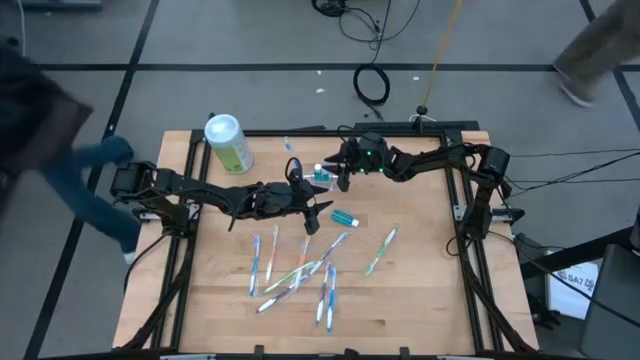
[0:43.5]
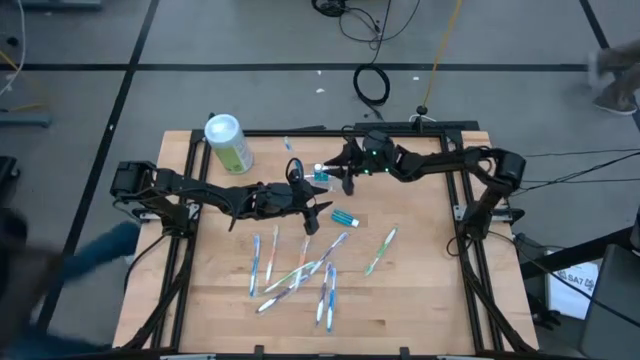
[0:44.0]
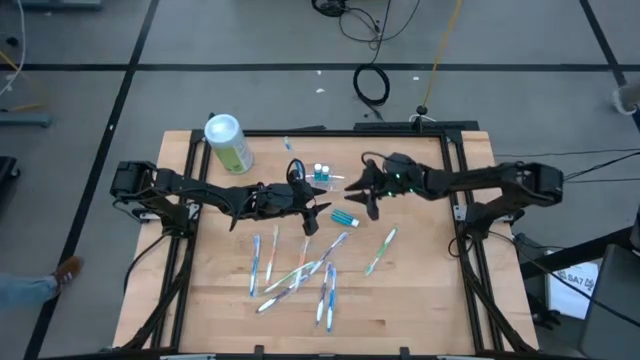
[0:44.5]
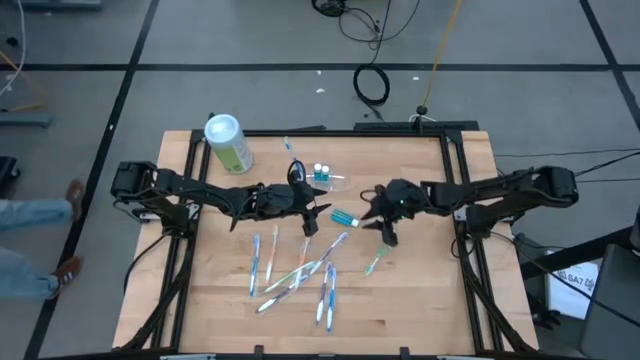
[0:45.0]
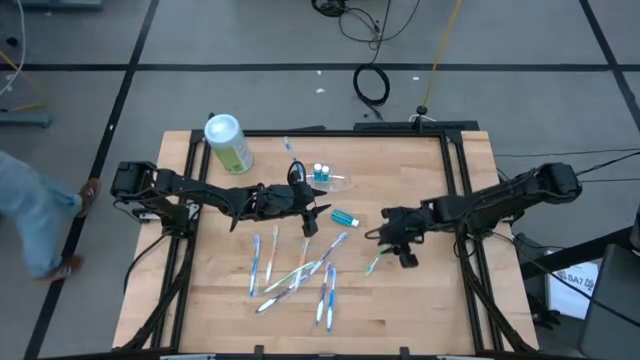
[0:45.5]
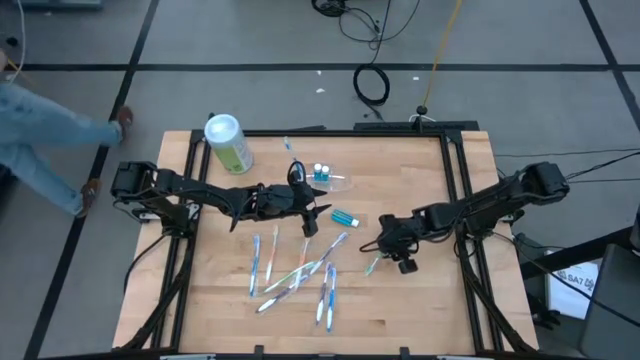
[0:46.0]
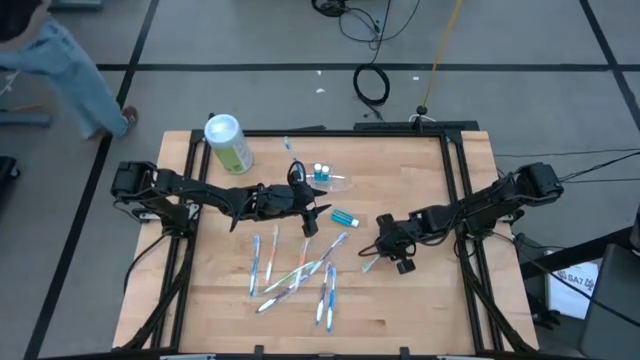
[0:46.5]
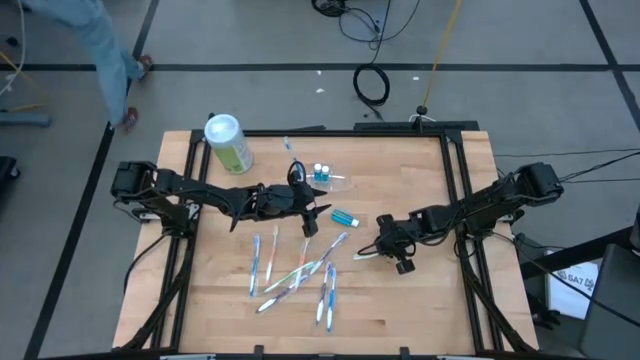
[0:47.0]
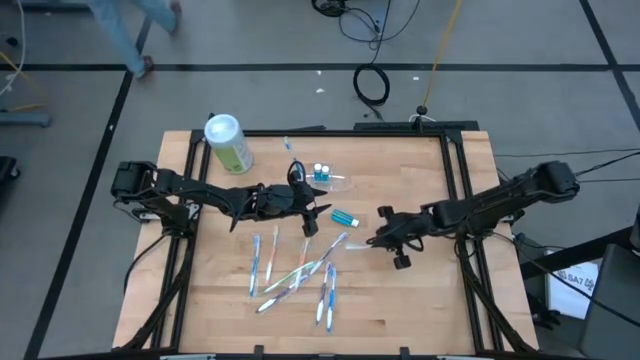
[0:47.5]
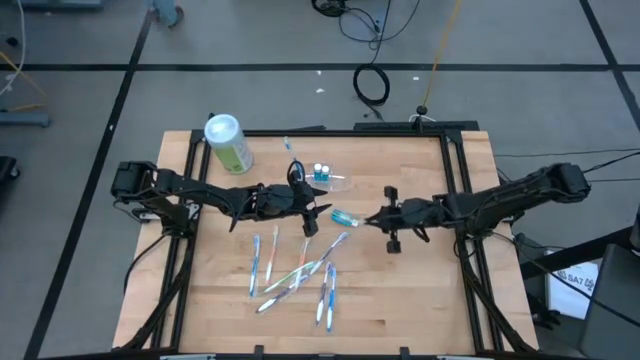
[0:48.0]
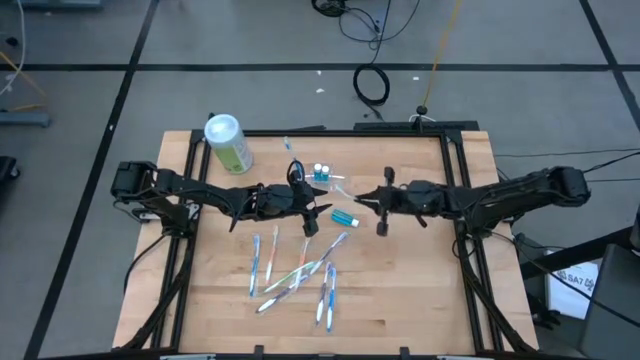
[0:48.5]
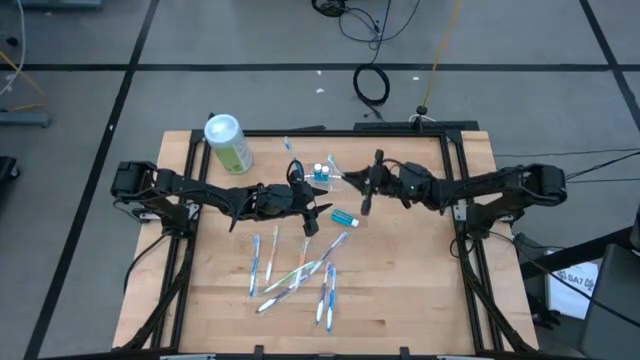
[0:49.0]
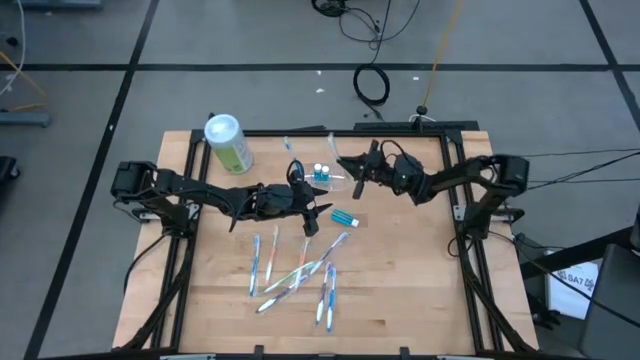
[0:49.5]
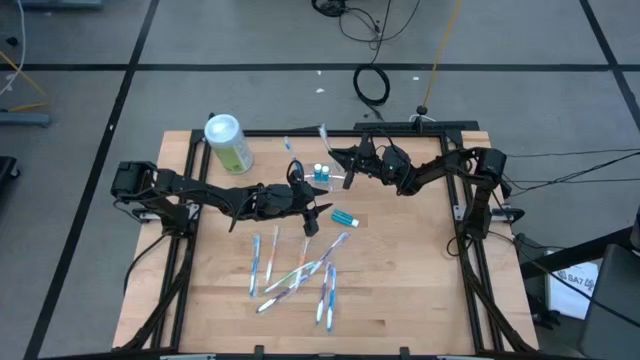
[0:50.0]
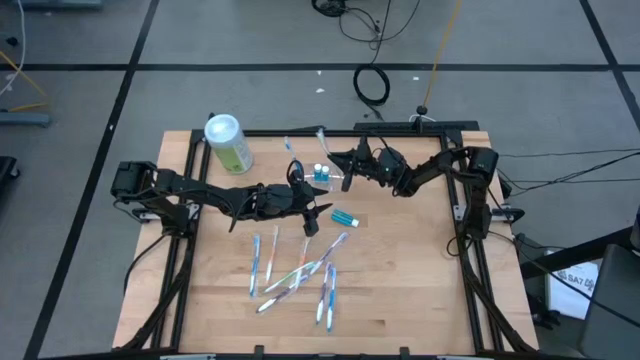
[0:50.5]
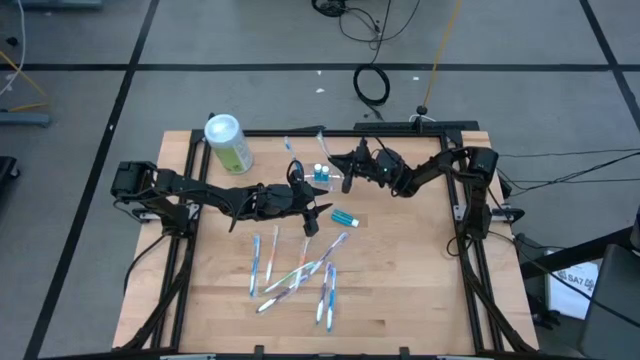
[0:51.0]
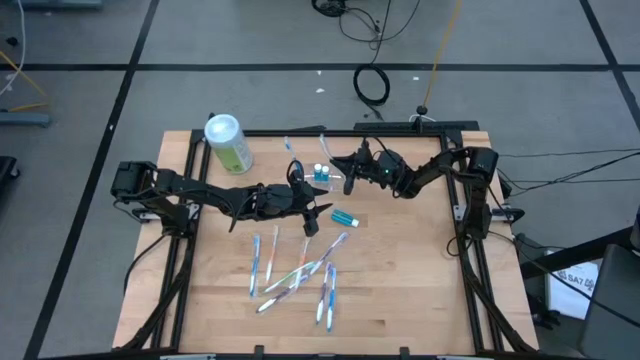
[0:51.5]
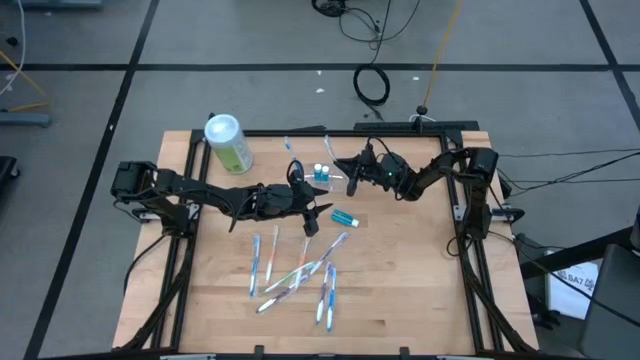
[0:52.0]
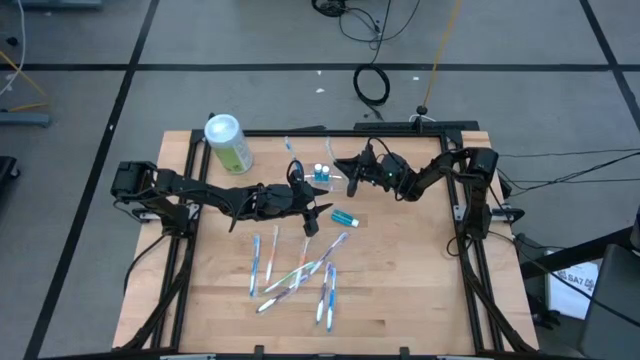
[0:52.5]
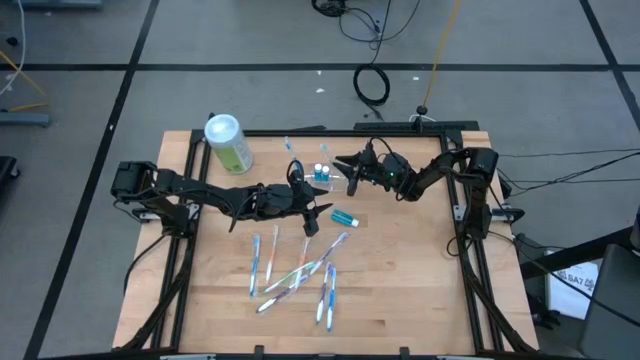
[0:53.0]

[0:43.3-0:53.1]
Task: Pick & Place toothbrushing station
Put the right green toothbrush into the transparent organizer

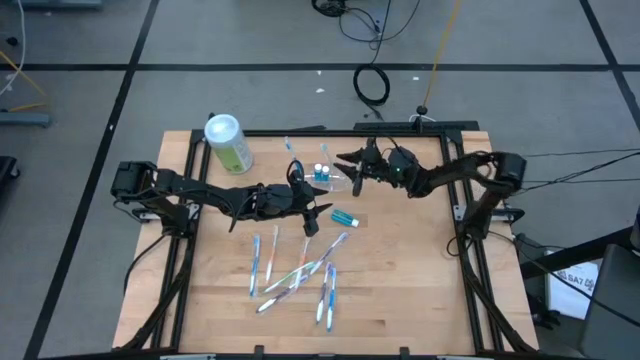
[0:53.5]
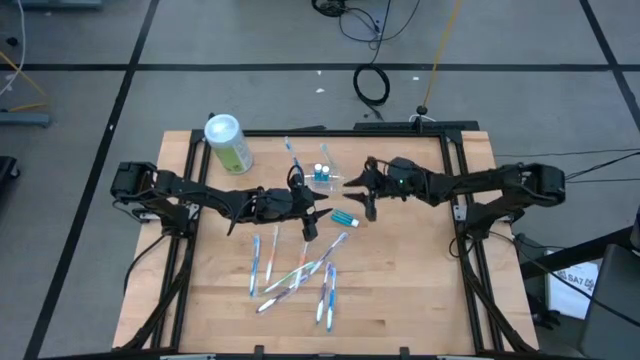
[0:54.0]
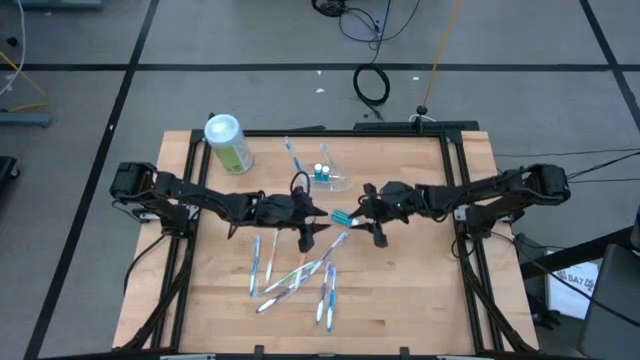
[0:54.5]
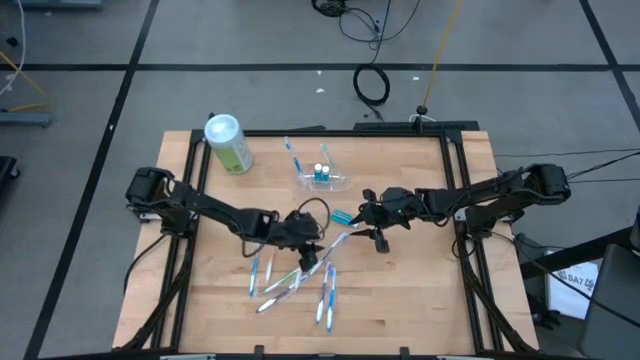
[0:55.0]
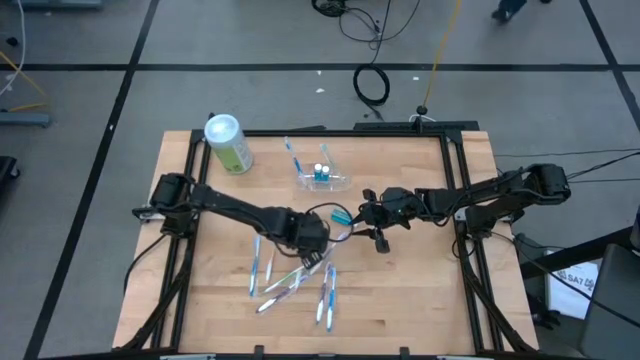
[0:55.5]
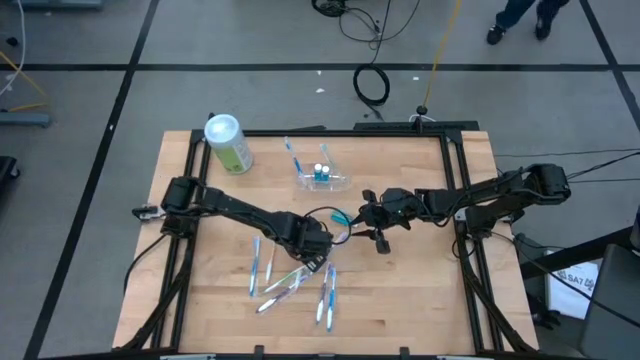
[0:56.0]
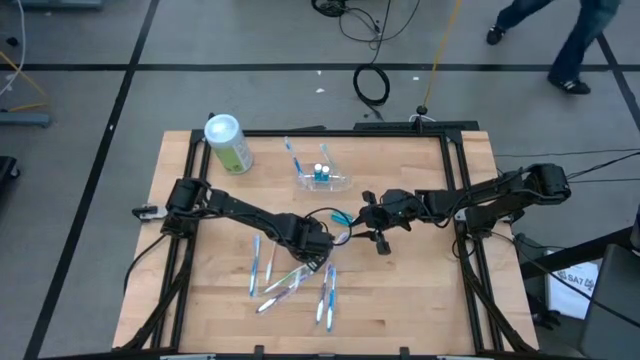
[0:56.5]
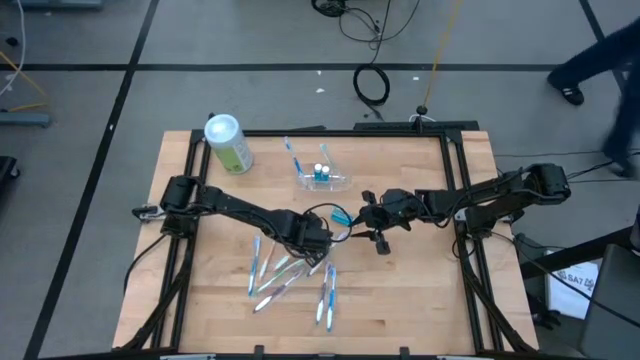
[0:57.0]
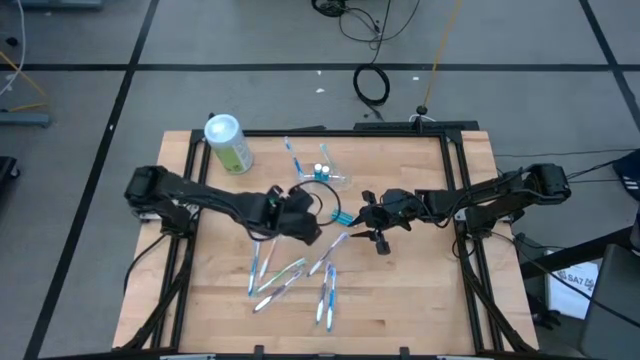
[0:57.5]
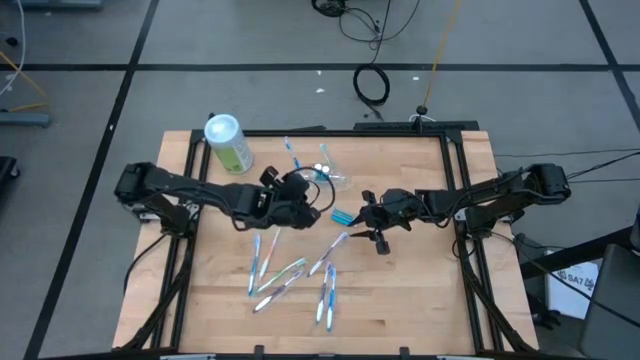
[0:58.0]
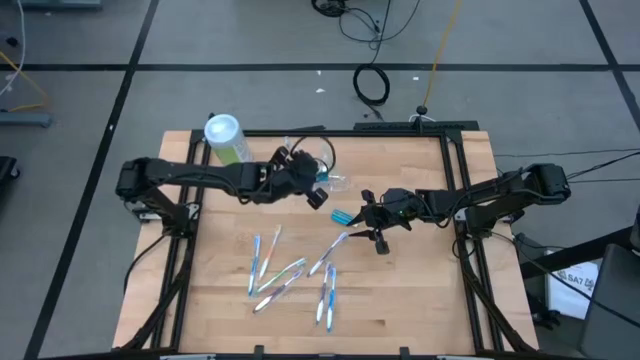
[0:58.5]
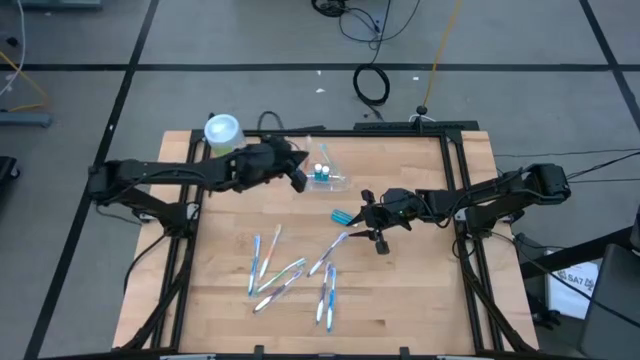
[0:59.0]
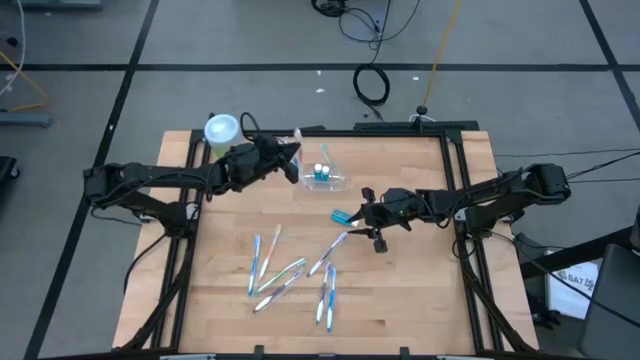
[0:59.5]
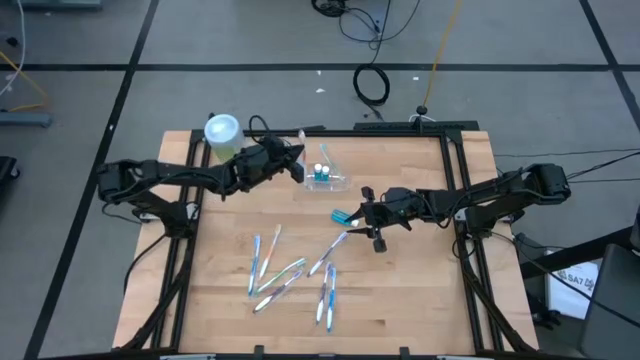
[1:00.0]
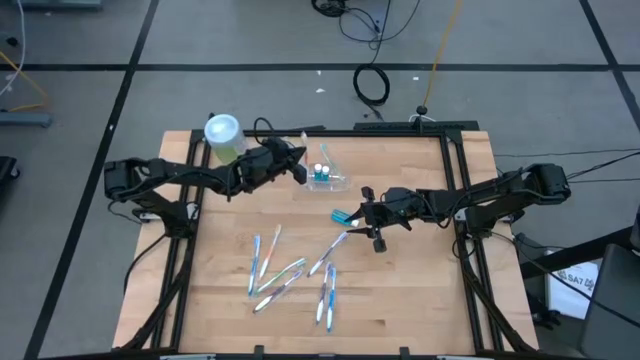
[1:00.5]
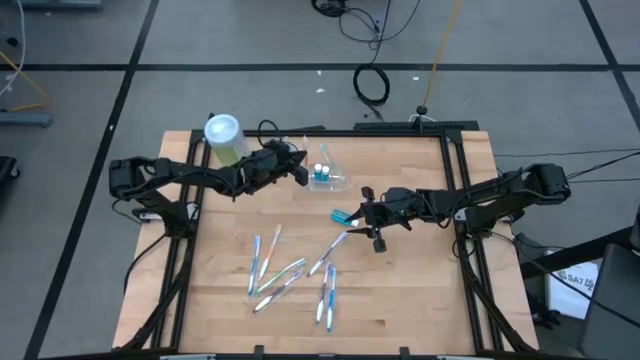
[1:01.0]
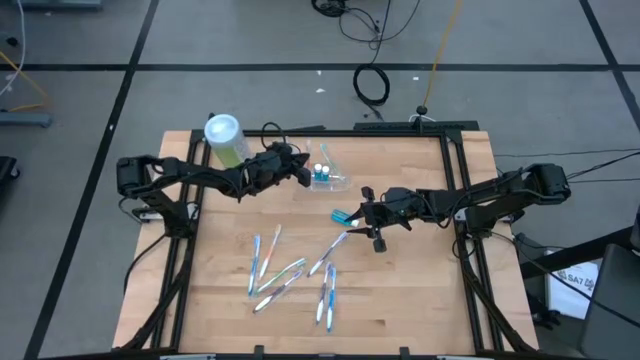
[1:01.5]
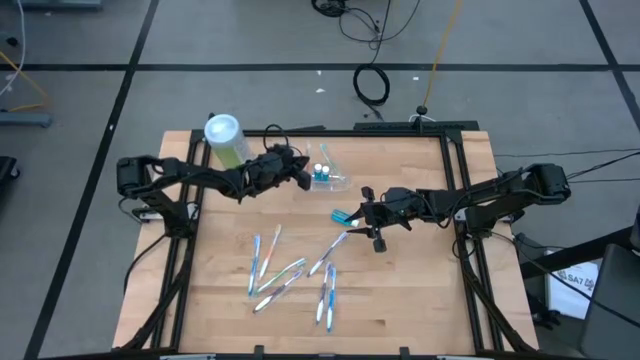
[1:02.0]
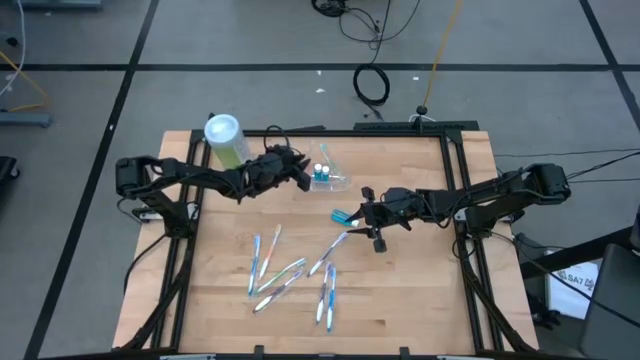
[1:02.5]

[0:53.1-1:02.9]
Put the right orange toothbrush into the transparent organizer

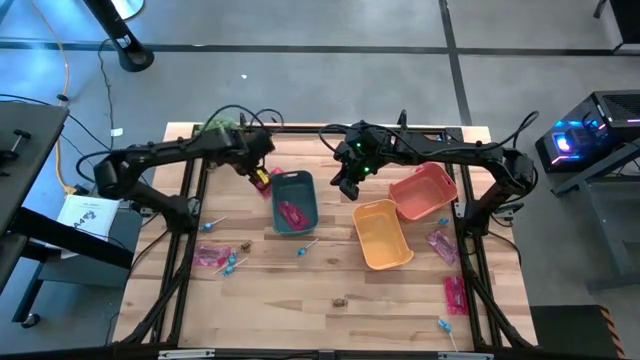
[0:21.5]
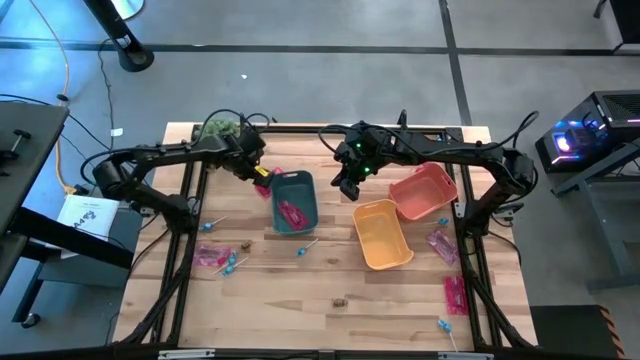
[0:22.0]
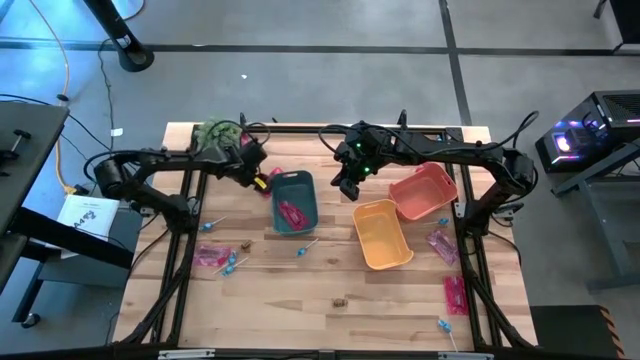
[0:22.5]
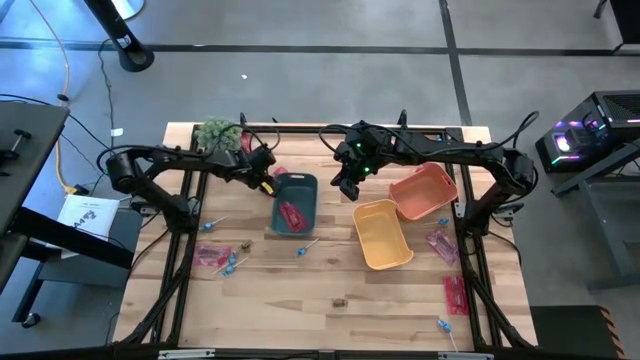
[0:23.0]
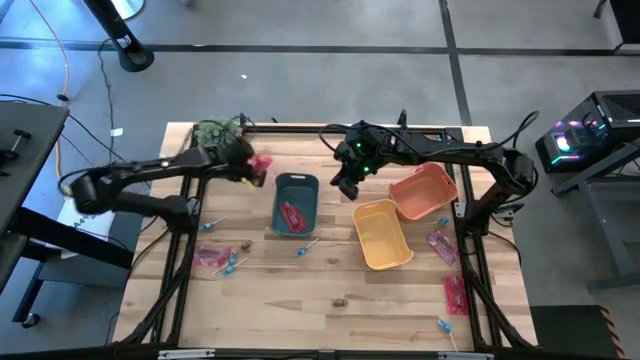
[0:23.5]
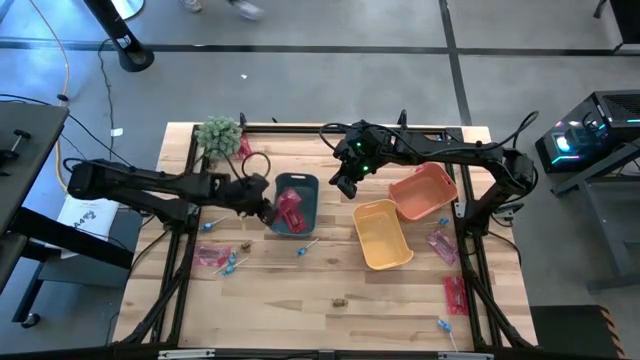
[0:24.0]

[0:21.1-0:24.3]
Task: Sort candy
Put the red candy pack into the blue bin

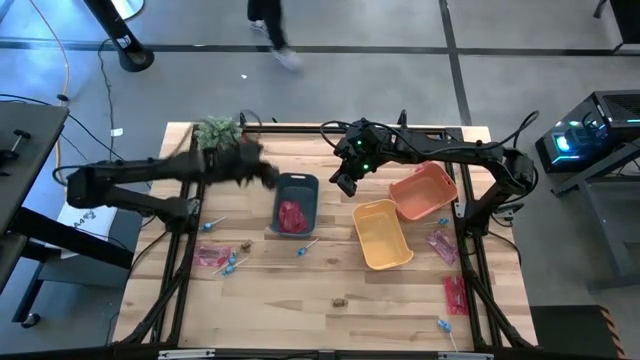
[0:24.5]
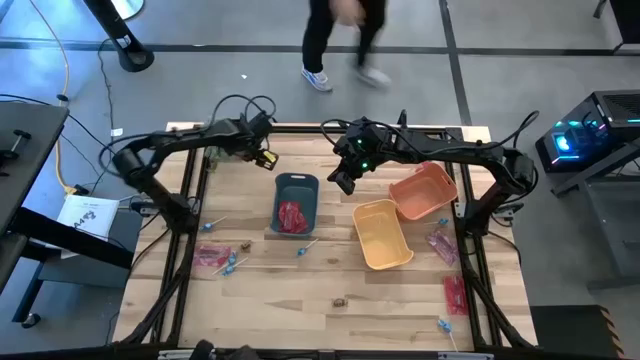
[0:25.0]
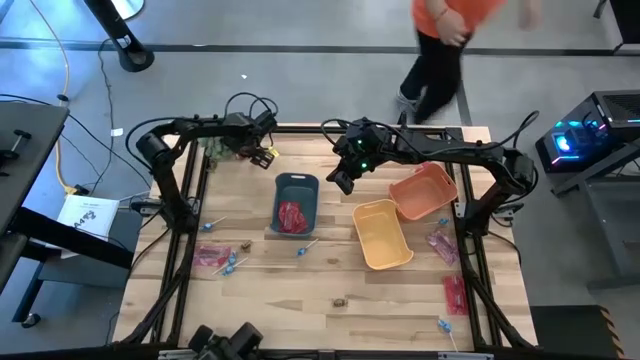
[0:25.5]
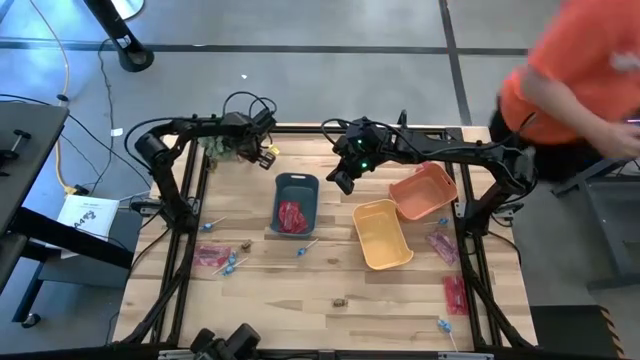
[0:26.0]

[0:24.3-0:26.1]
Put the red candy pack into the blue bin
